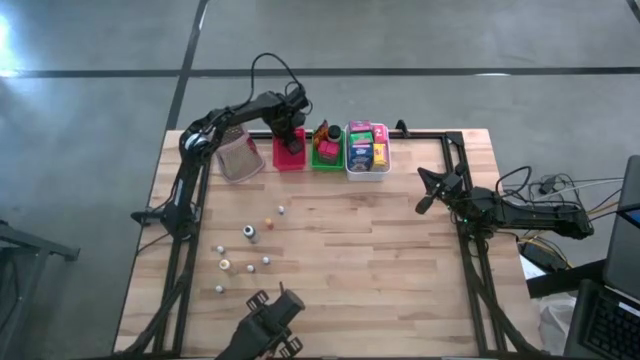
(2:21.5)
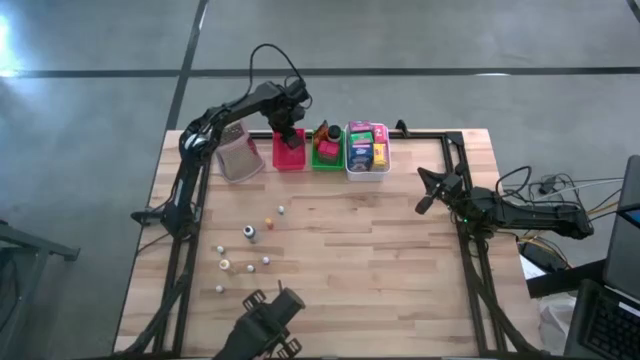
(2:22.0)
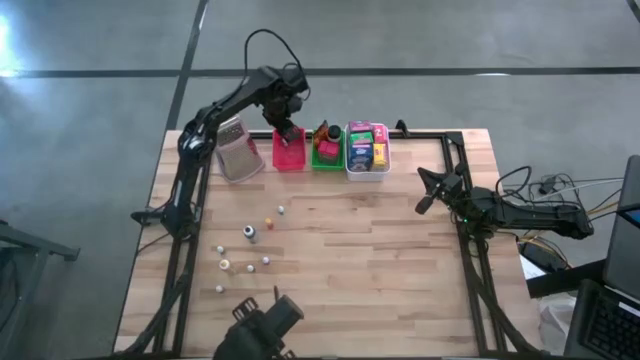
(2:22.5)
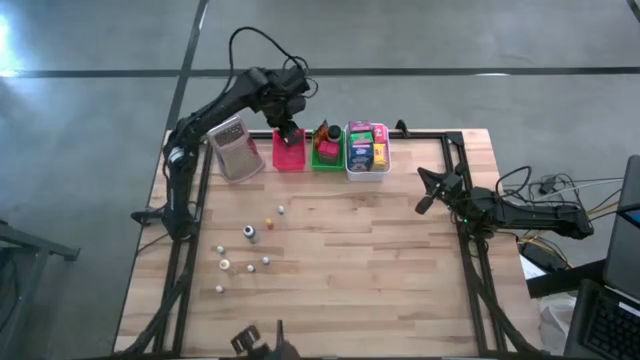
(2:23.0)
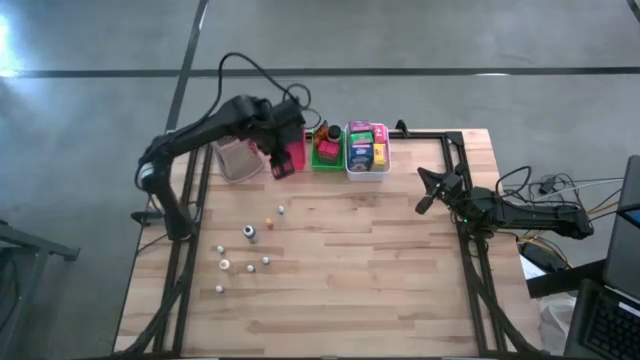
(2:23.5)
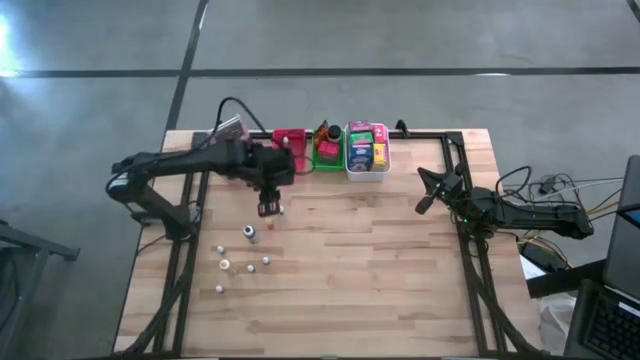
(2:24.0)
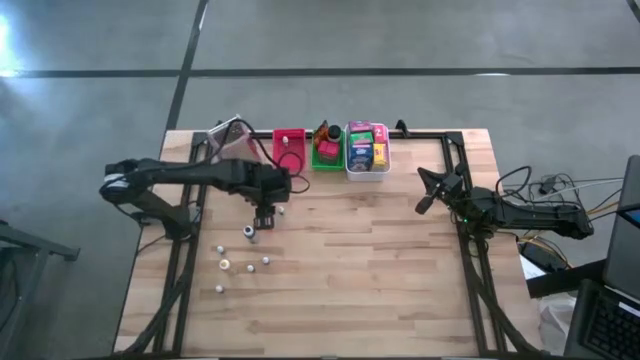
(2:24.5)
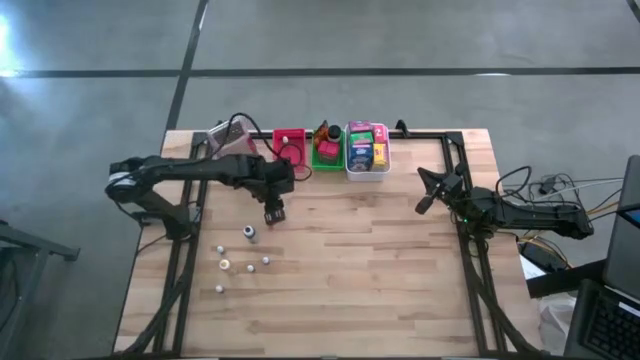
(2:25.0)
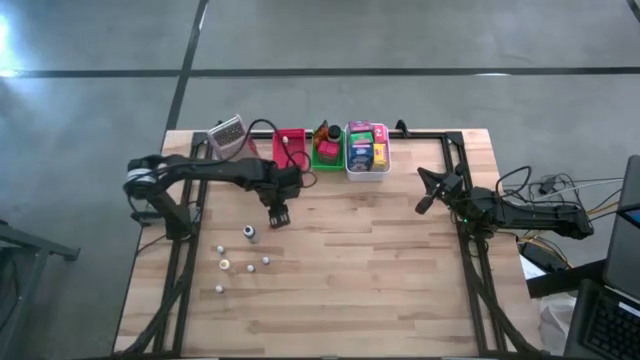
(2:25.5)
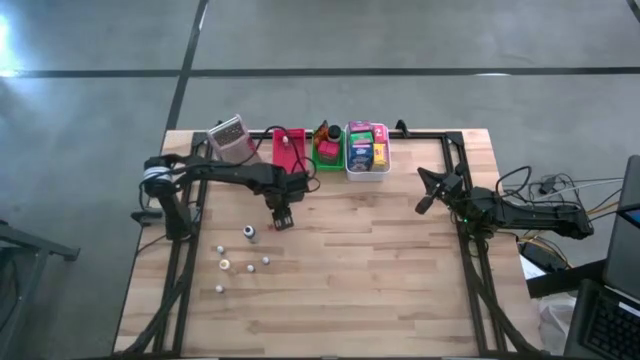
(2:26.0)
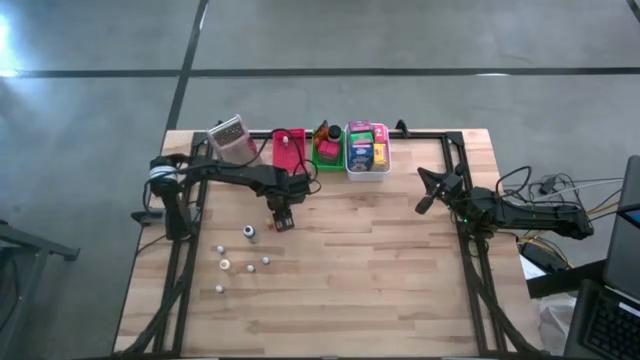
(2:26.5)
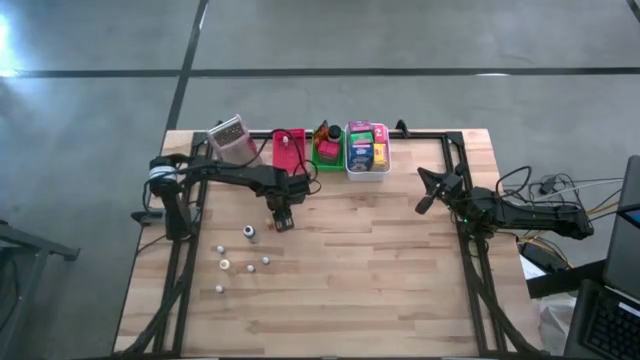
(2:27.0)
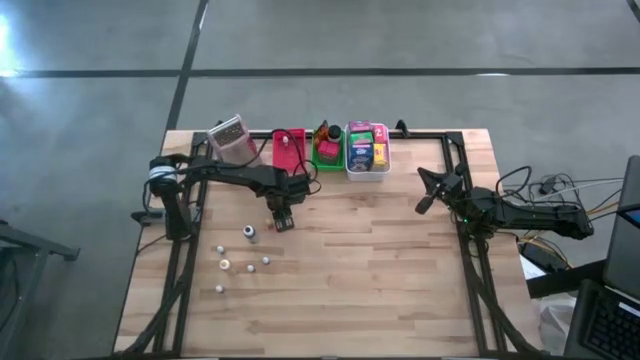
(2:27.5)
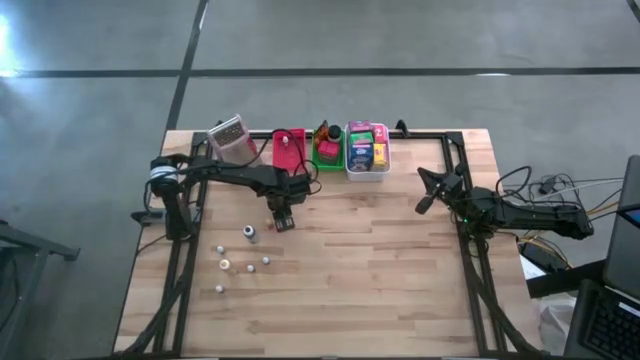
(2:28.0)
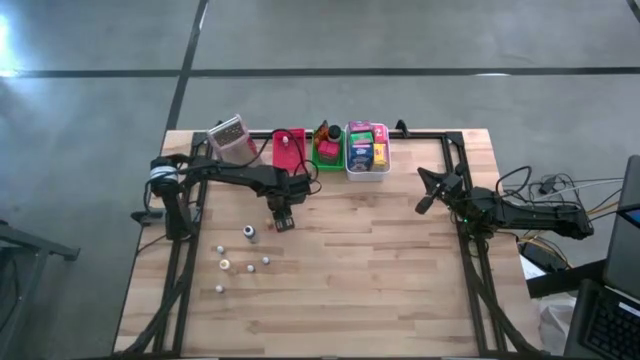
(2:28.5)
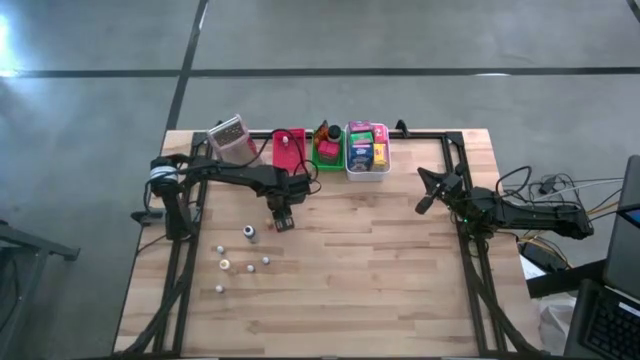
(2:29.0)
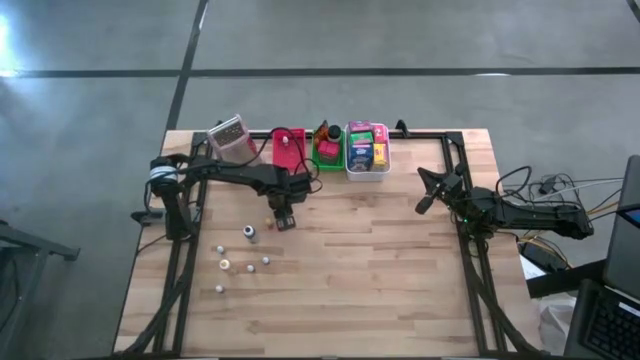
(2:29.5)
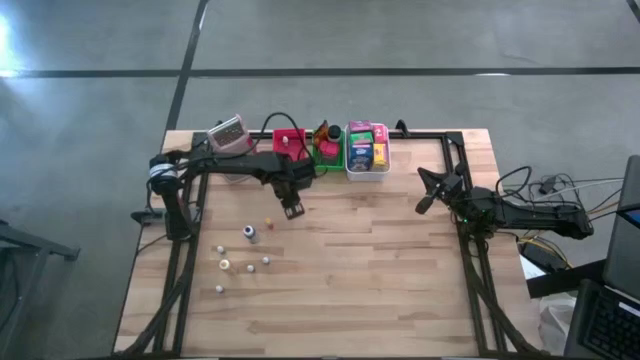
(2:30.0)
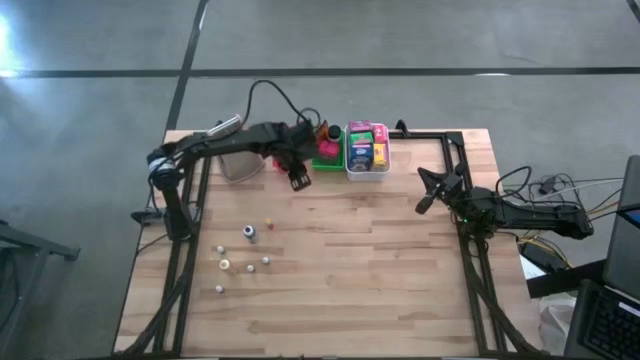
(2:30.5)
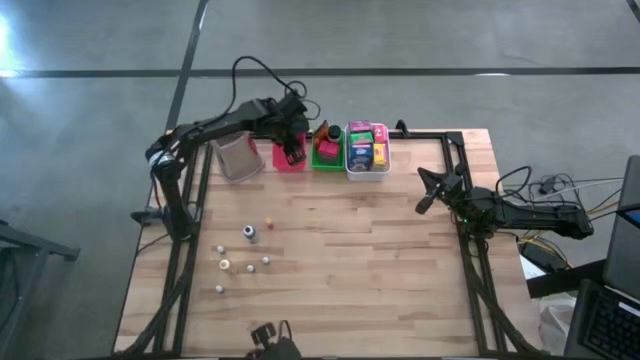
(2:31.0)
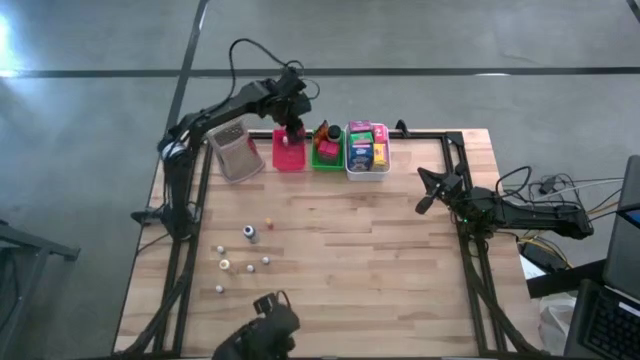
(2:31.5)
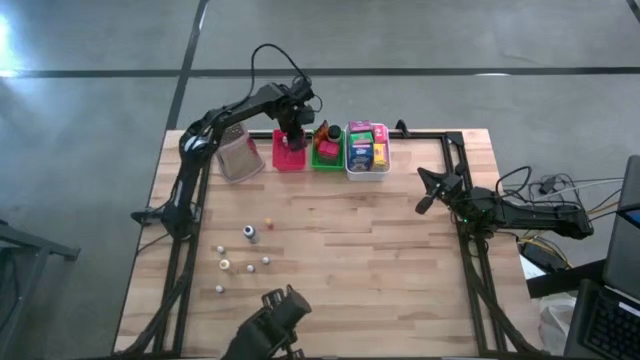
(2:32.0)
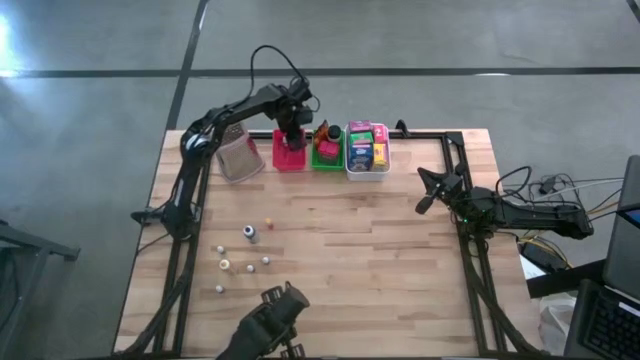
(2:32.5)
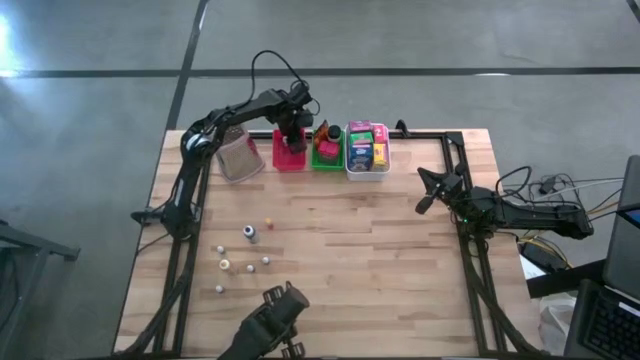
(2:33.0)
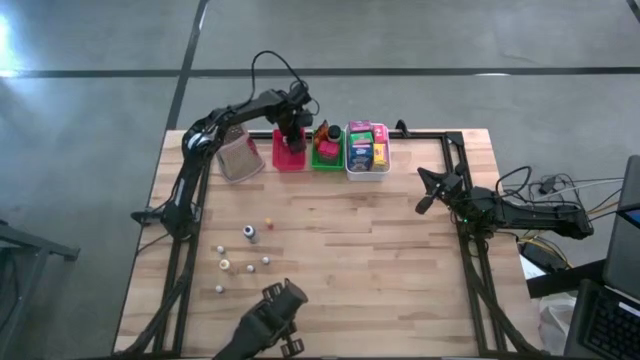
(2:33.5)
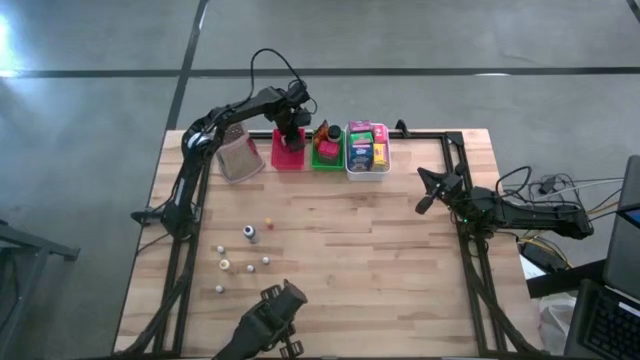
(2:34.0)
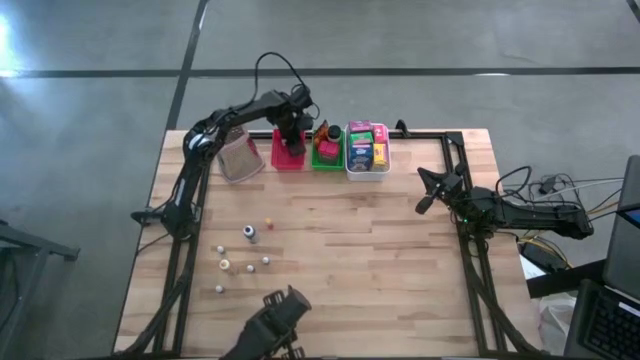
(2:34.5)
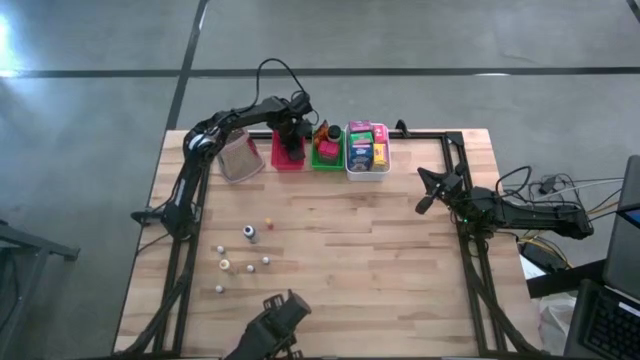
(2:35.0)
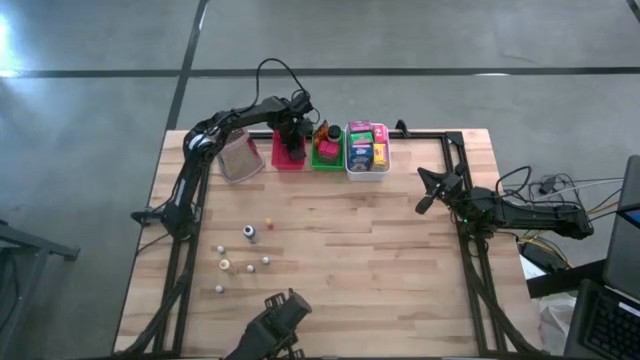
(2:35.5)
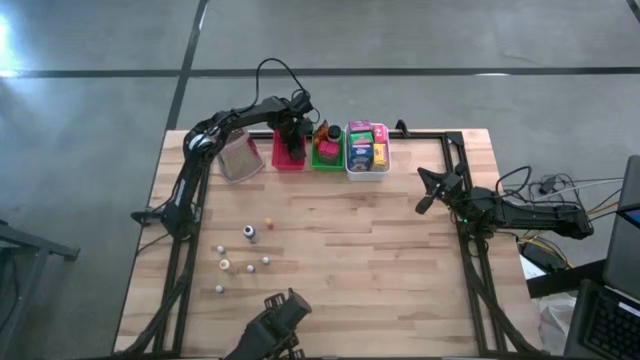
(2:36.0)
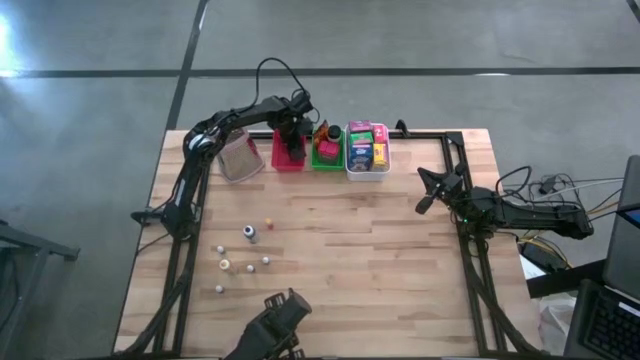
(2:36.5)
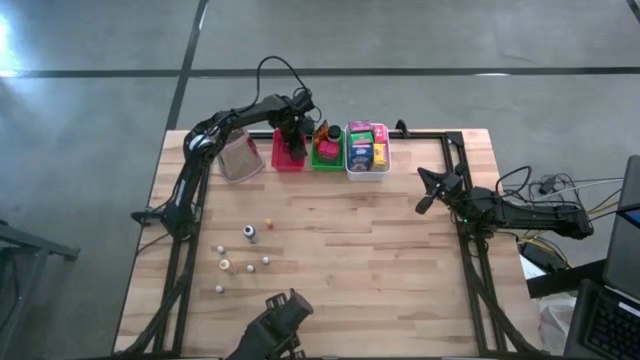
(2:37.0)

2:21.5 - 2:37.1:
Task: Pick & Place Kitchen Items
Put the small black food coloring bottle into the red bin

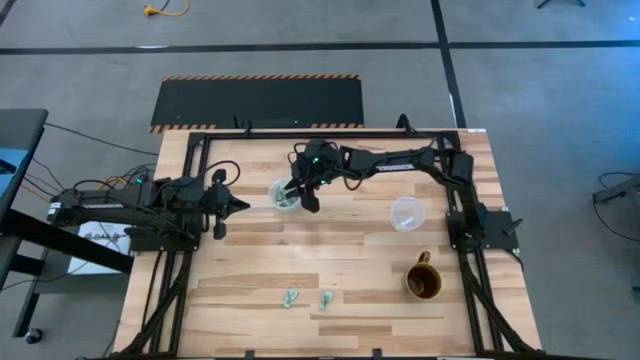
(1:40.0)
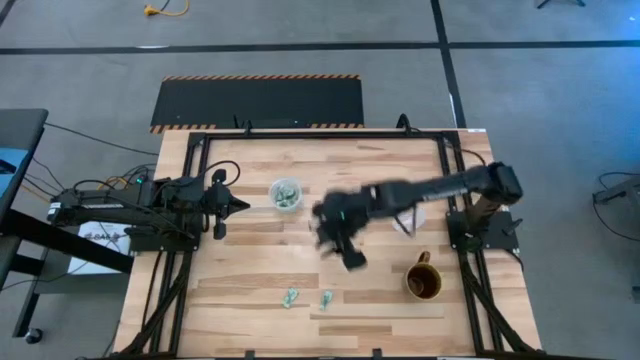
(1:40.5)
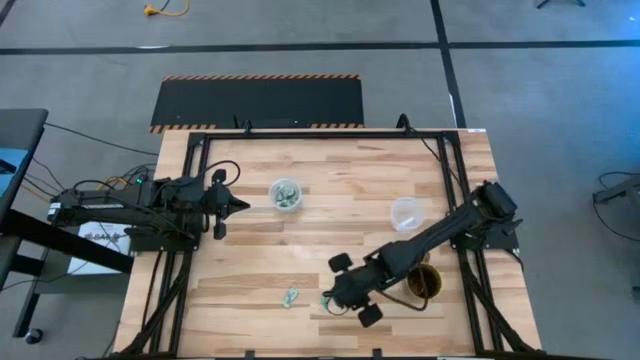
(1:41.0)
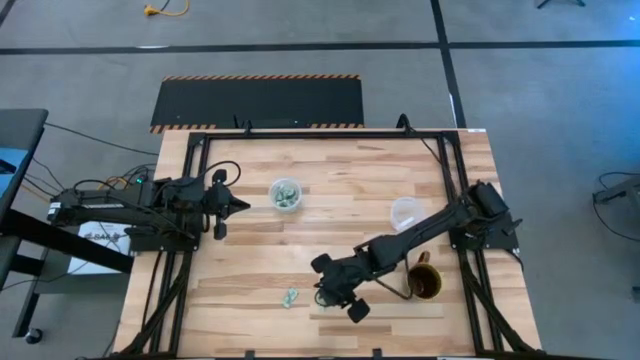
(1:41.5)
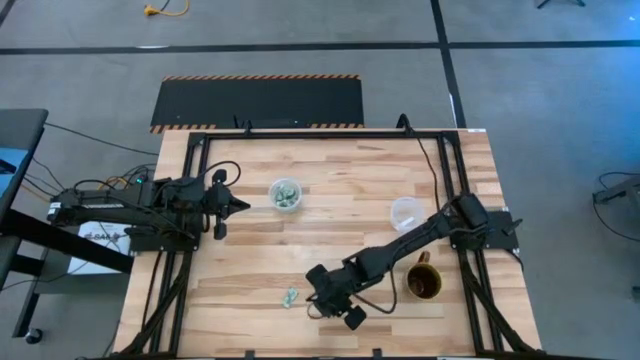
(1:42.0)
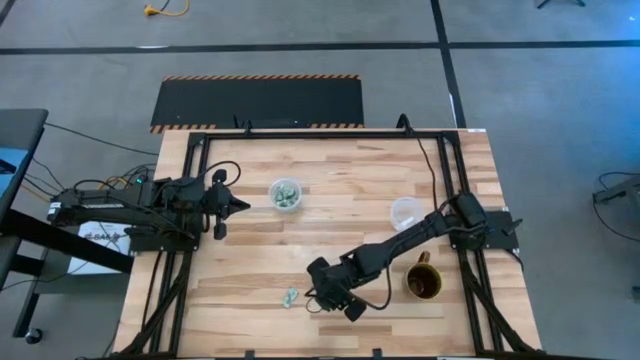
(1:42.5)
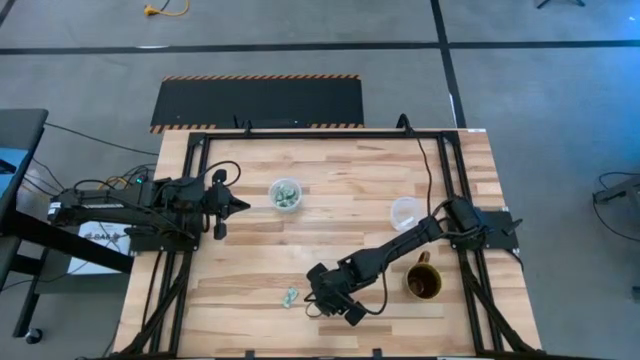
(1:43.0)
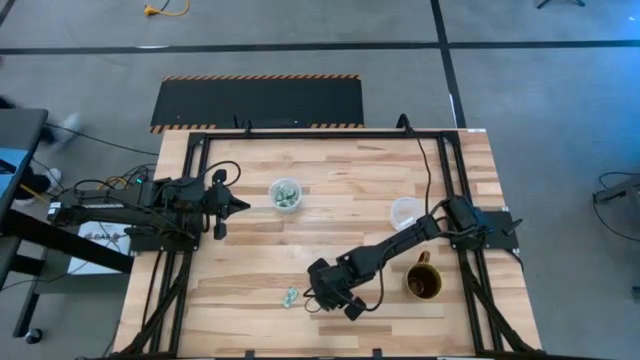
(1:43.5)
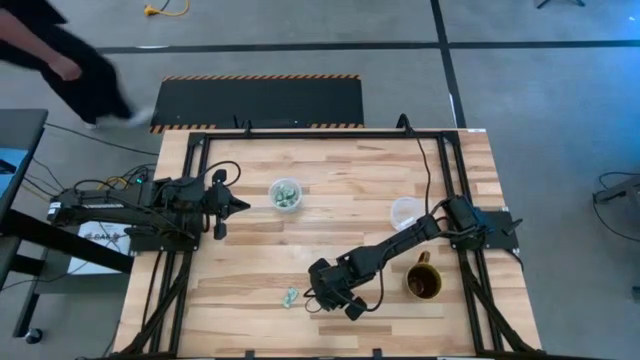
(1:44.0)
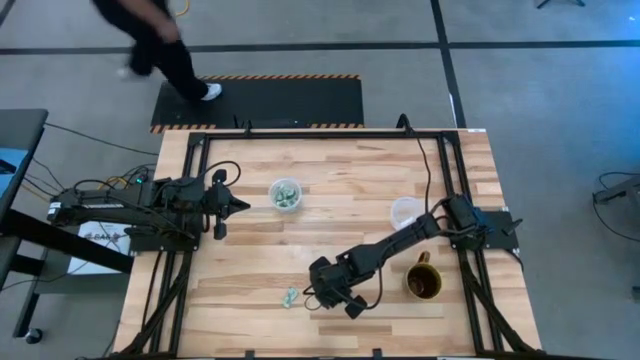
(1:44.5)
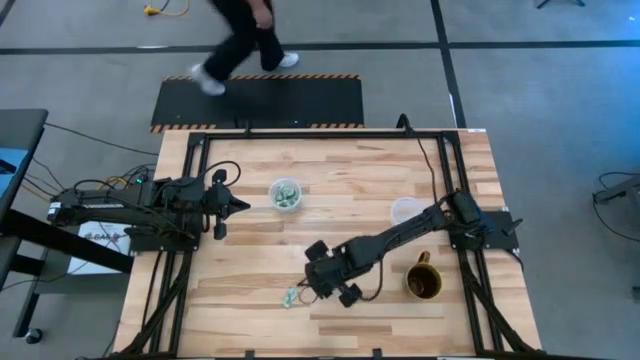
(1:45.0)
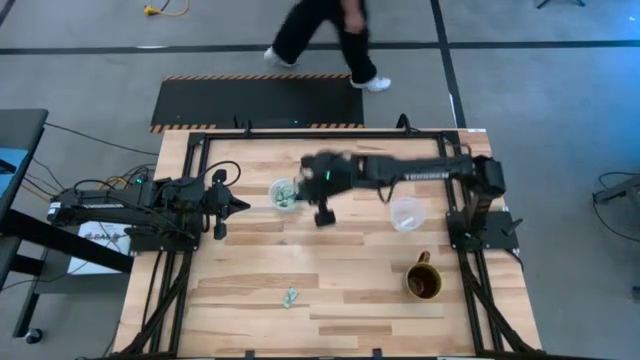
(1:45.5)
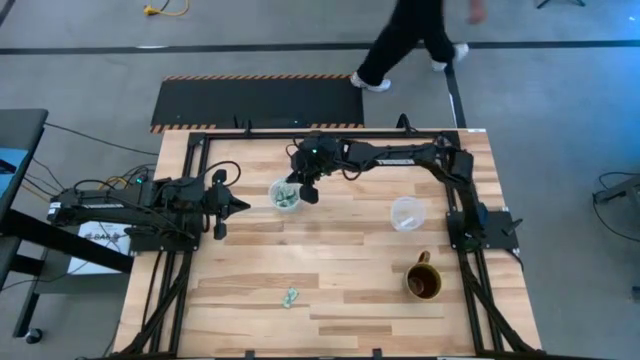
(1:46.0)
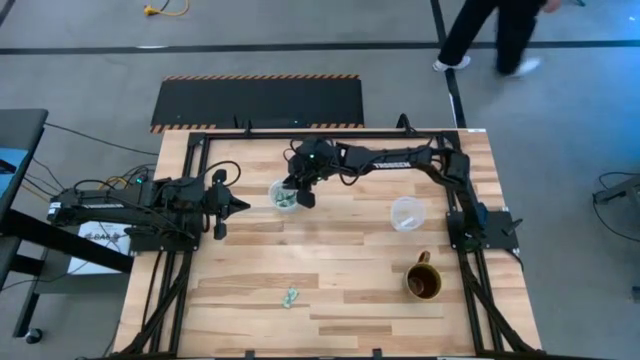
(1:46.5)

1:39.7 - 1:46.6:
Task: Pick and place Stevia / Truvia into bins
Put the white stevia packet into the left transparent container
